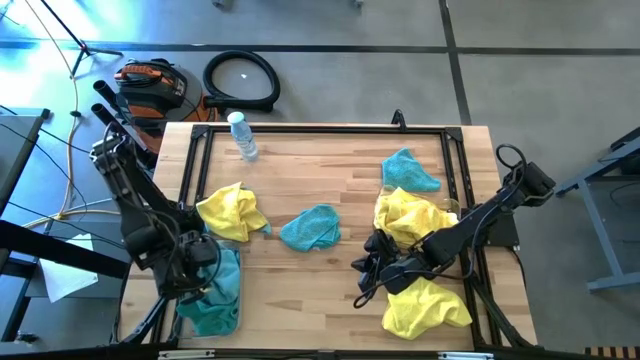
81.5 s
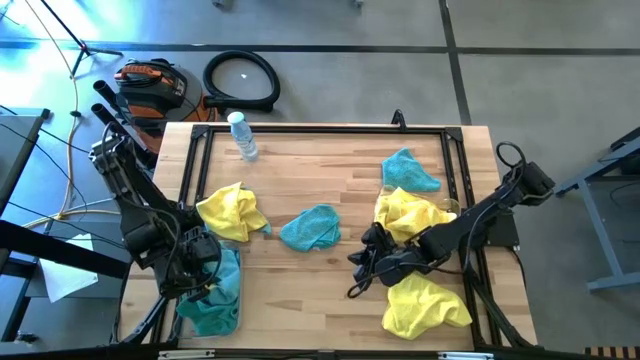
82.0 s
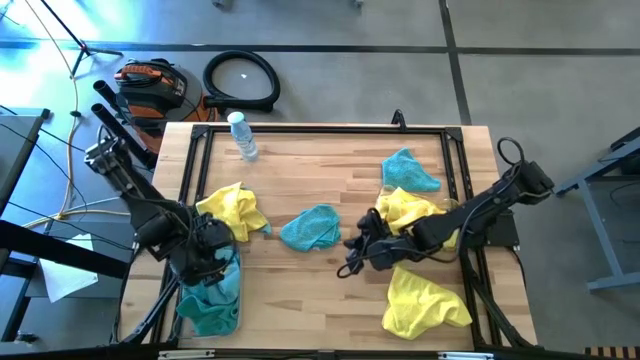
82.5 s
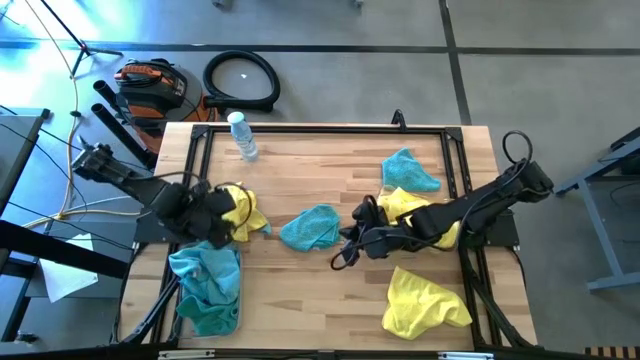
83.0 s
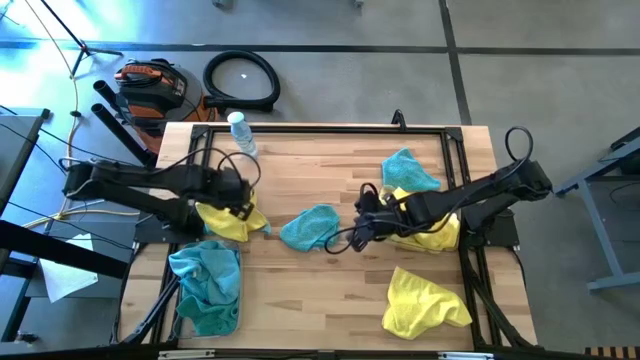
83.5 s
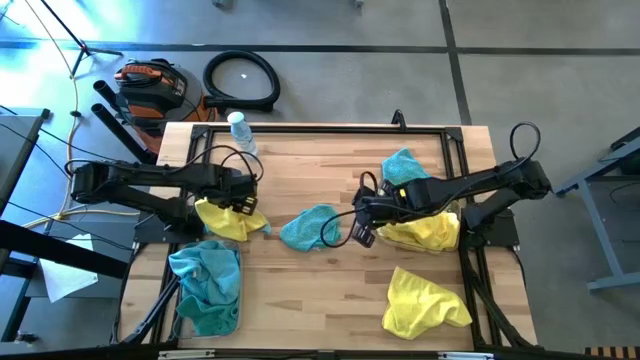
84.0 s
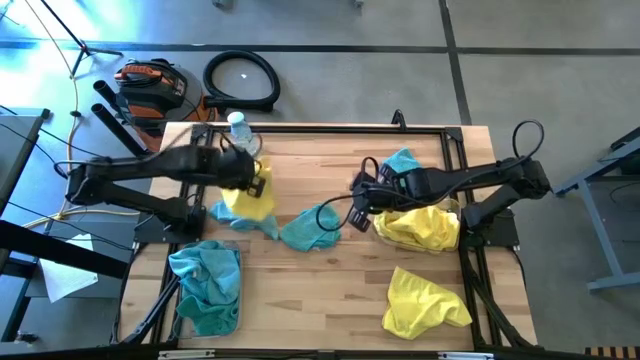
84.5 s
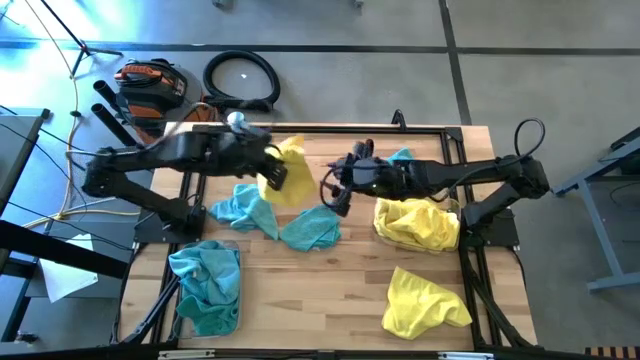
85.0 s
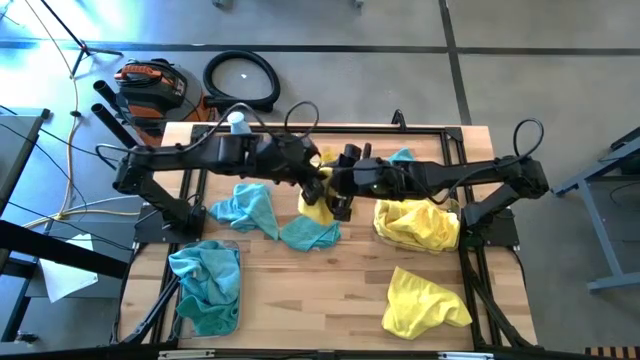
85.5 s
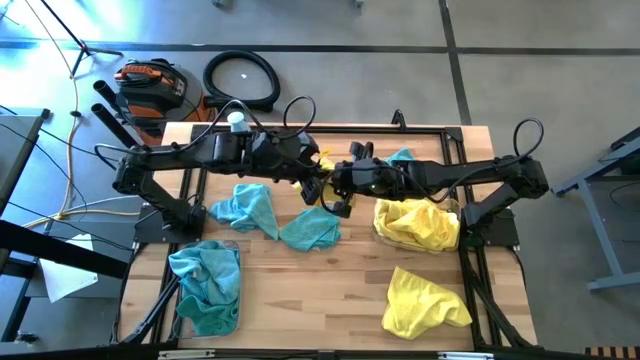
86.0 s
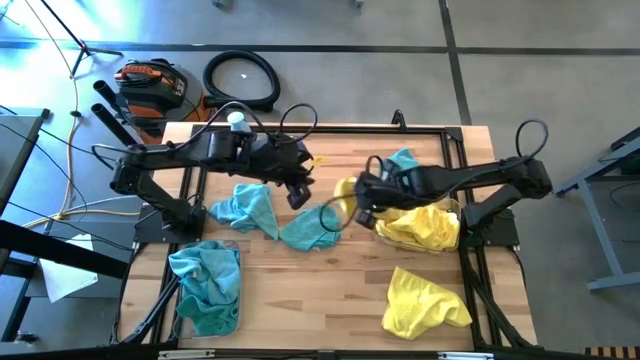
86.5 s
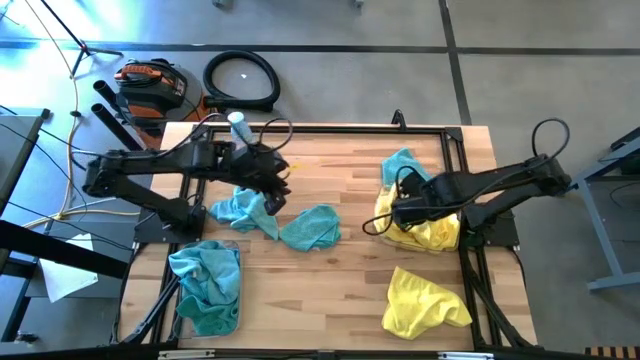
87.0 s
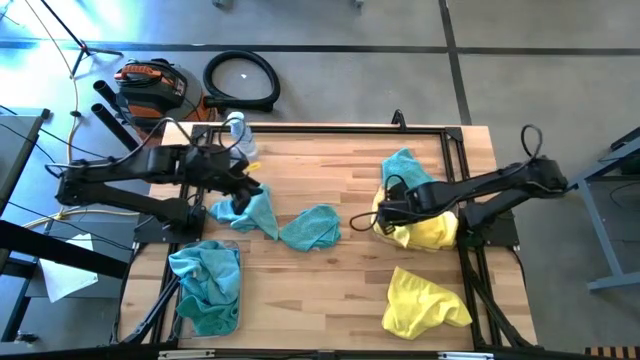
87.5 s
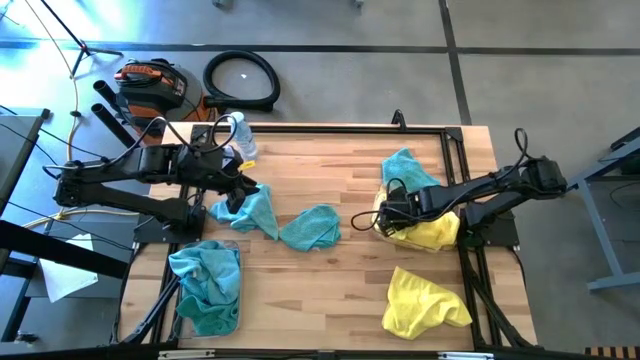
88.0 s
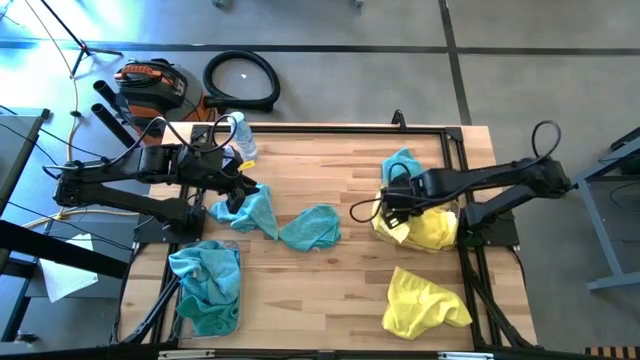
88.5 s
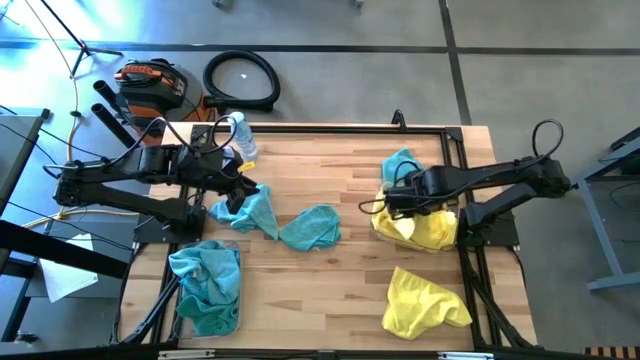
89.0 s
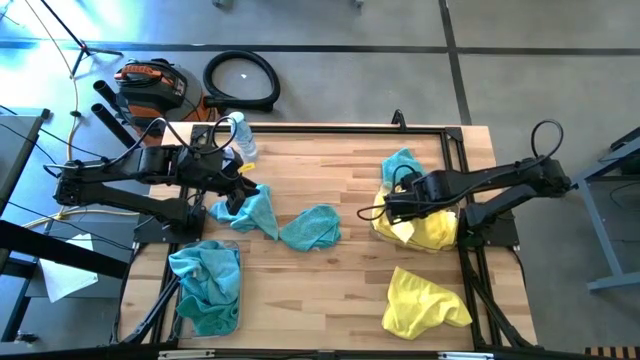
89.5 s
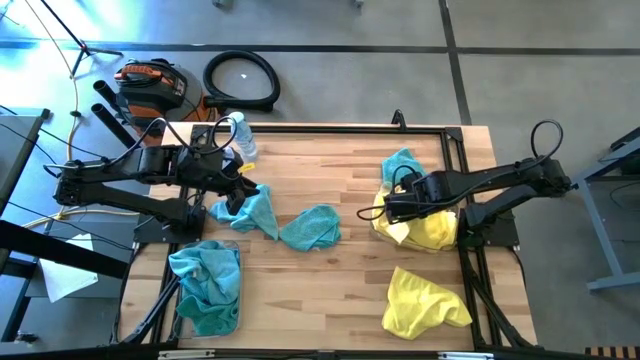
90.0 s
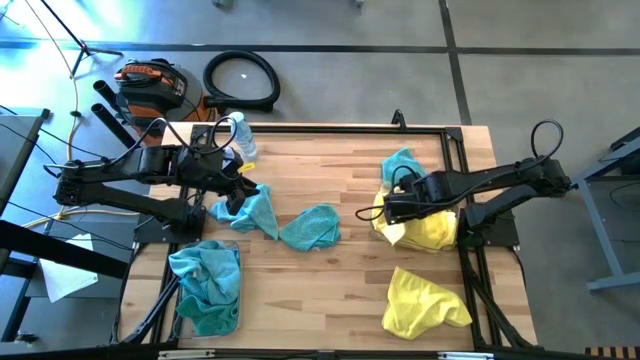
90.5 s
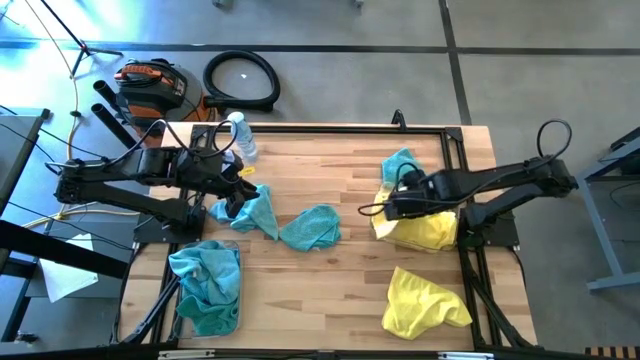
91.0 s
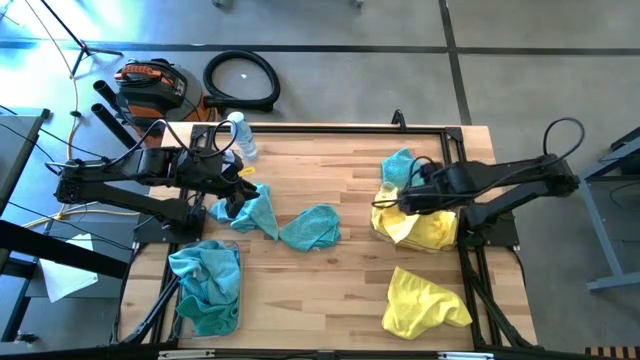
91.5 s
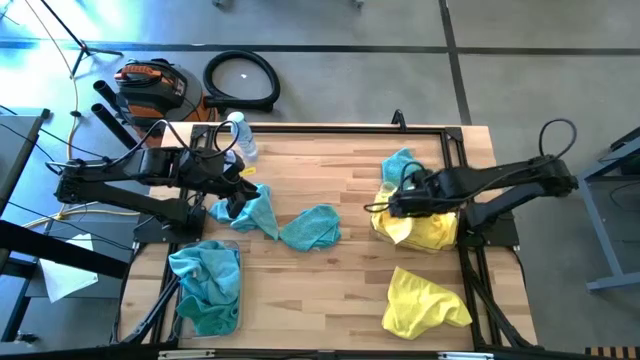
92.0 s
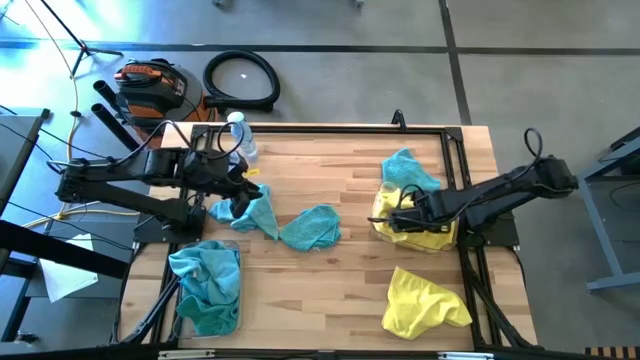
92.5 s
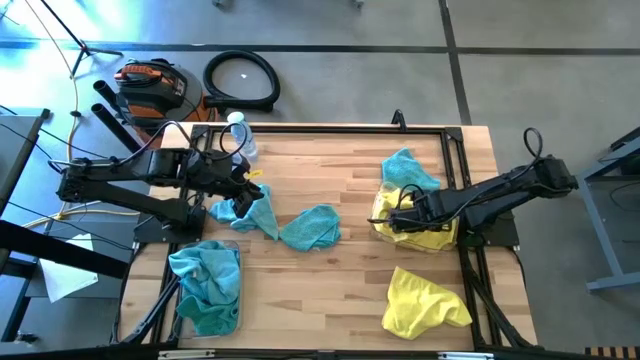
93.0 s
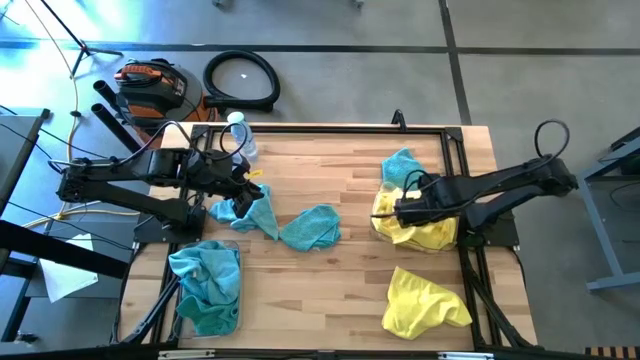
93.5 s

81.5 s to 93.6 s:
Task: Sort microfiber towel by color & place in baskets
Put the yellow microfiber towel into the right transparent bin

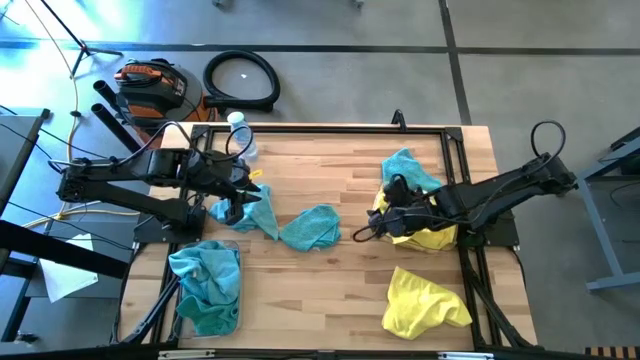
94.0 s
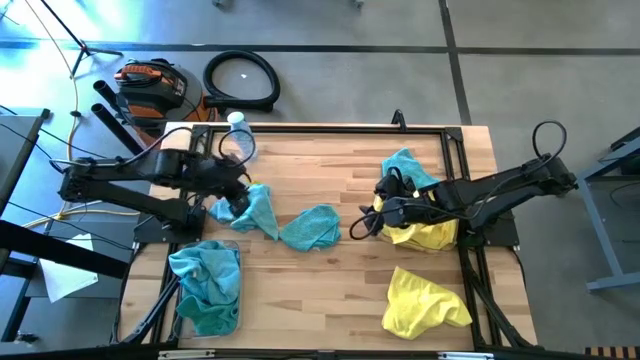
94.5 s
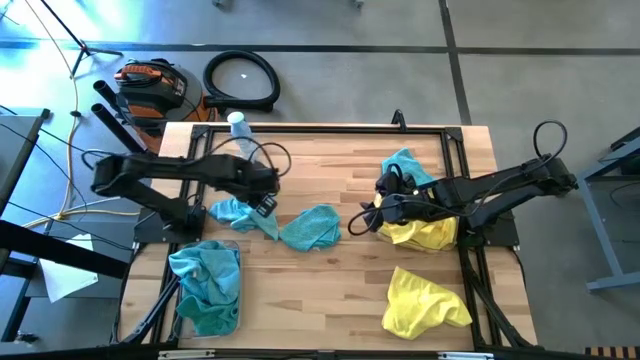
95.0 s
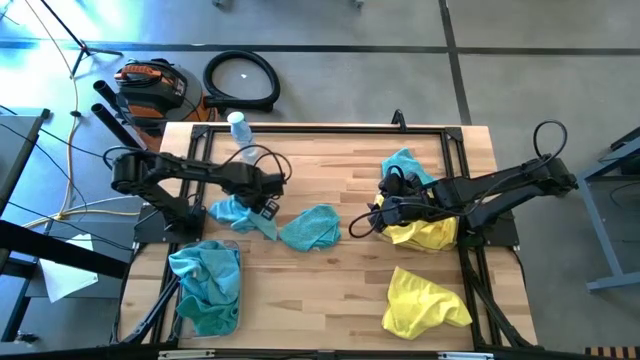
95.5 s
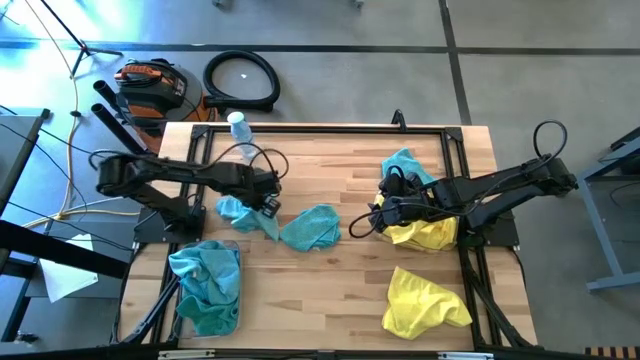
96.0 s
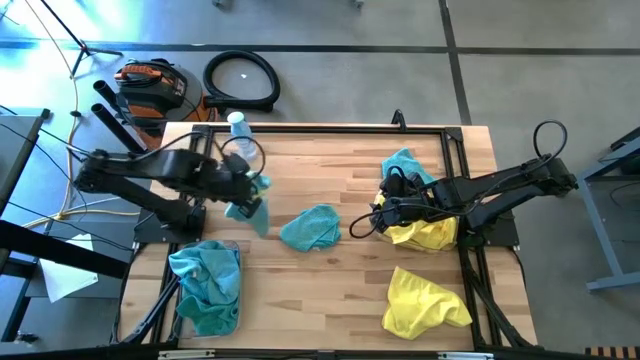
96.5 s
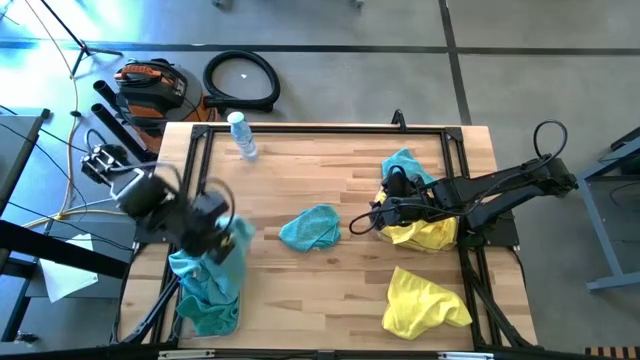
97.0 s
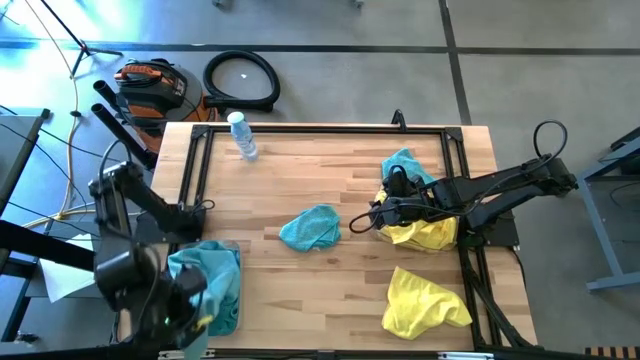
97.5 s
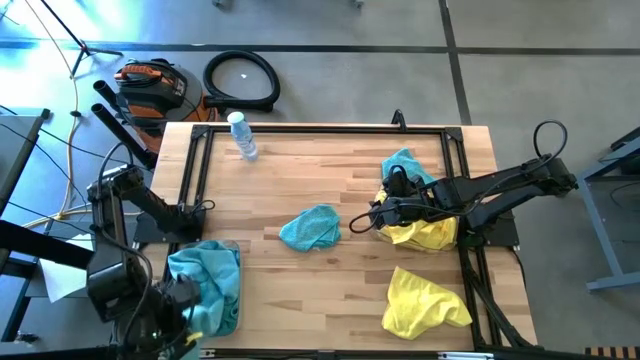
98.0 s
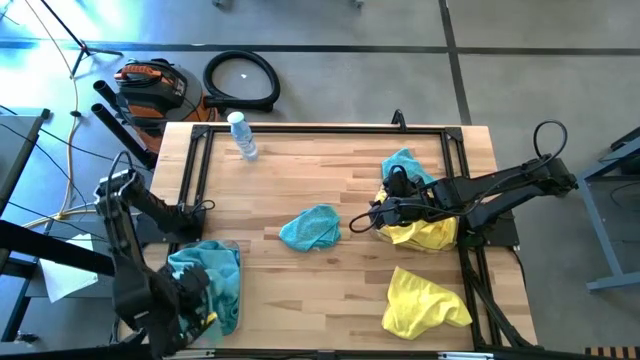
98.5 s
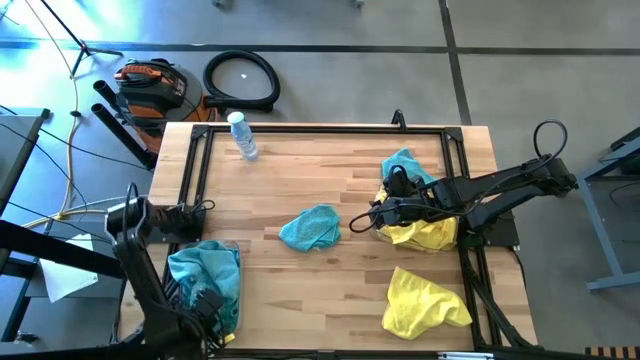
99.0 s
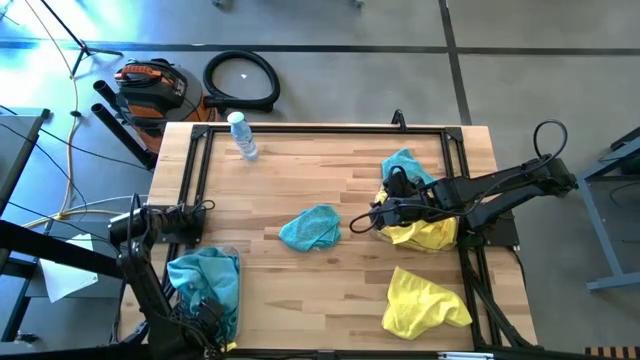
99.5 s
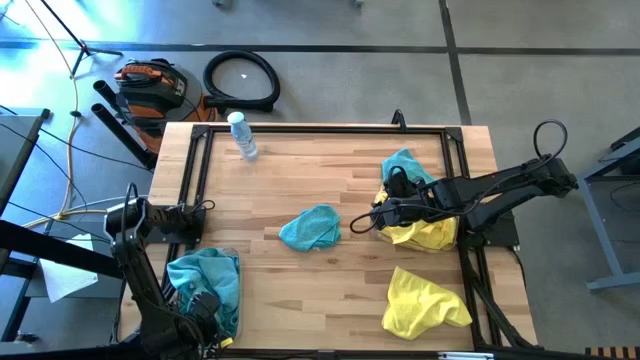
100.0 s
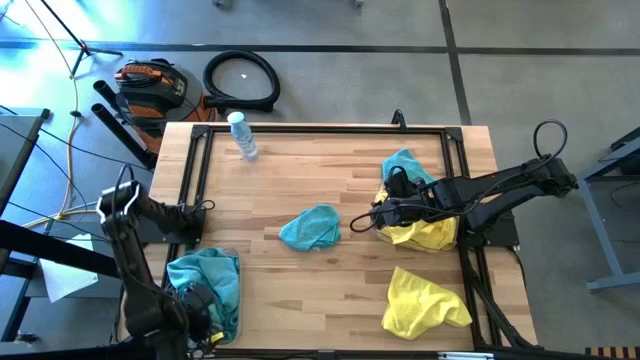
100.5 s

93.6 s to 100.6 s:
Put the blue microfiber towel into the left transparent bin

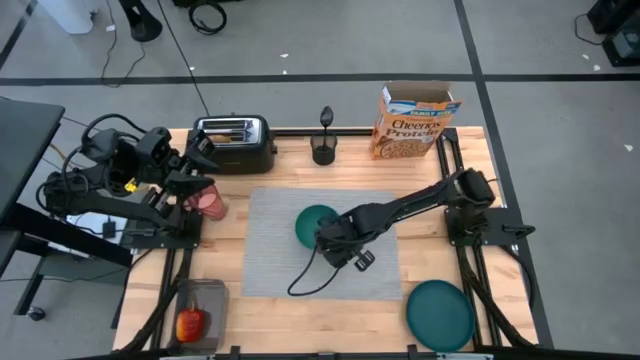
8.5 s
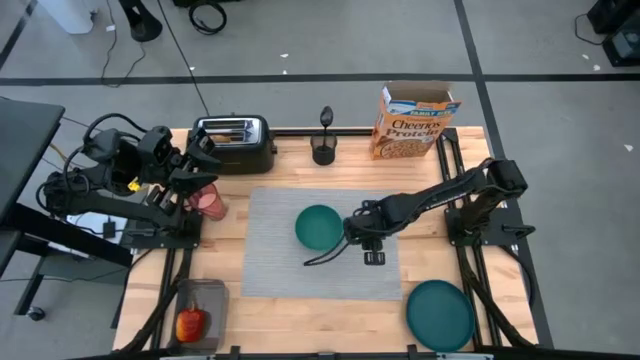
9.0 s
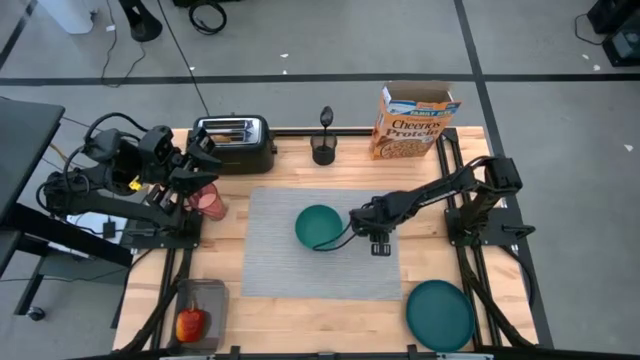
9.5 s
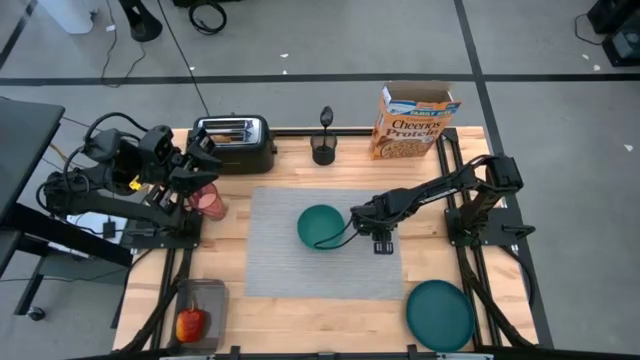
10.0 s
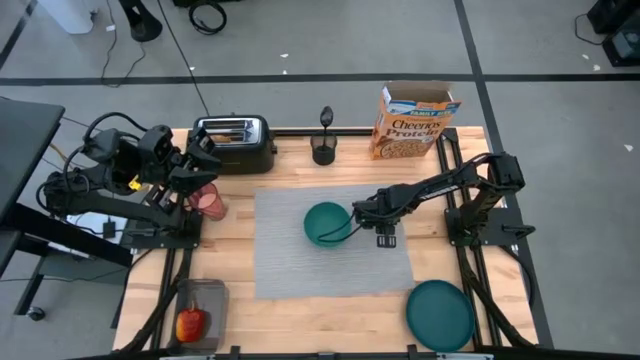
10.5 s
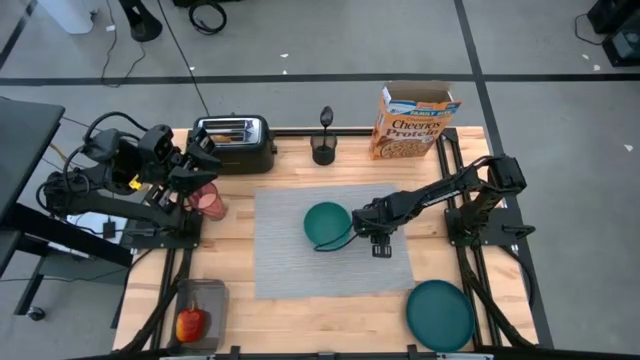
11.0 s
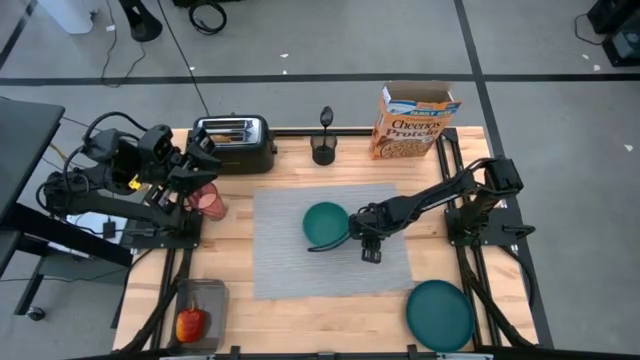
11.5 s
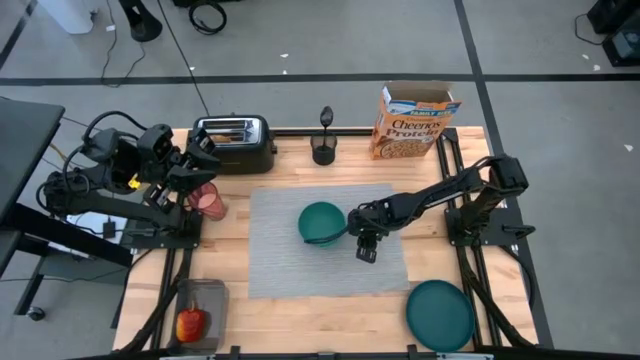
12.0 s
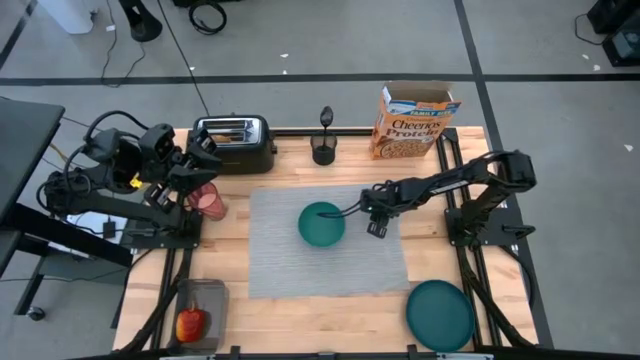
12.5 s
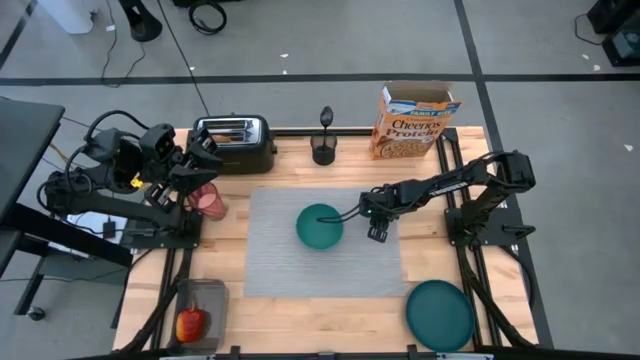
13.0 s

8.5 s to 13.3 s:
Task: Arrange a breakfast setting
Adjust the gray placemat
